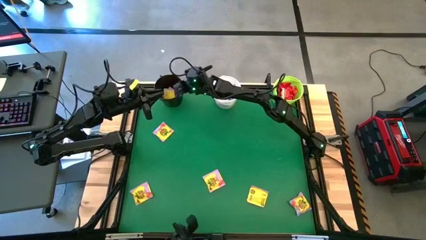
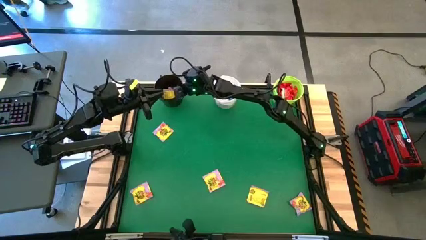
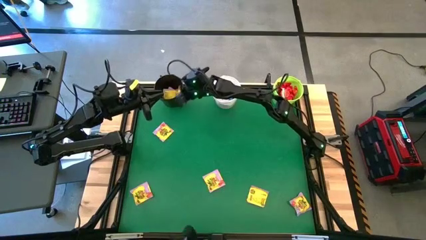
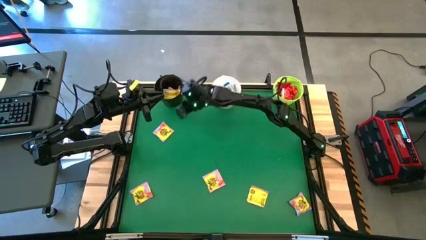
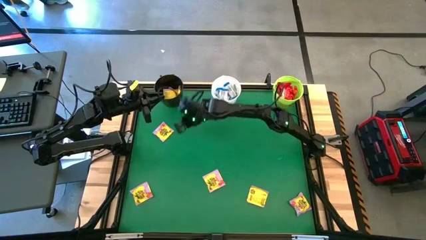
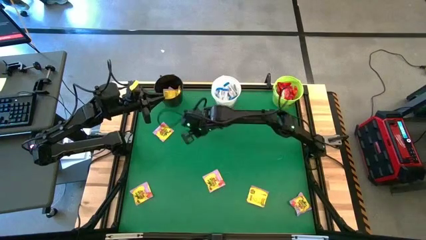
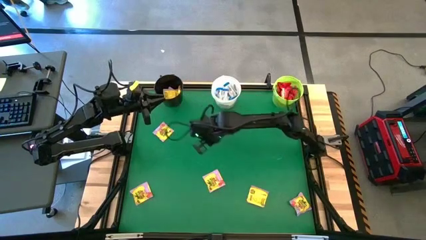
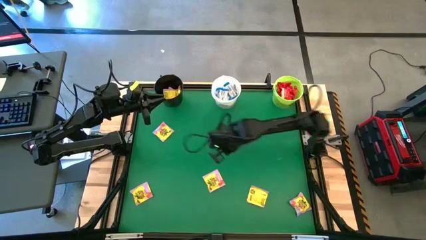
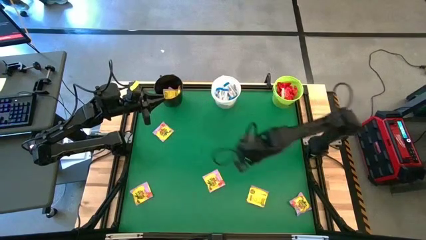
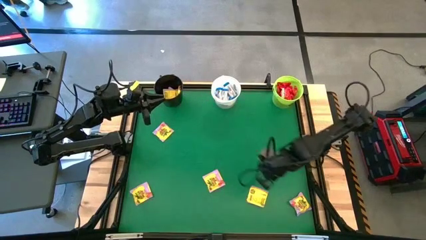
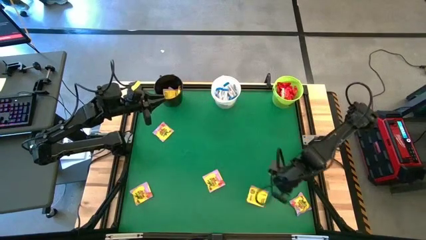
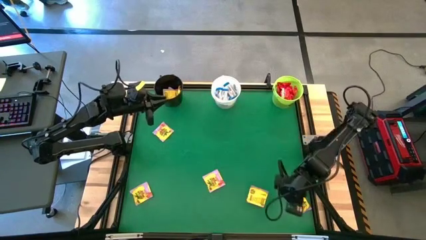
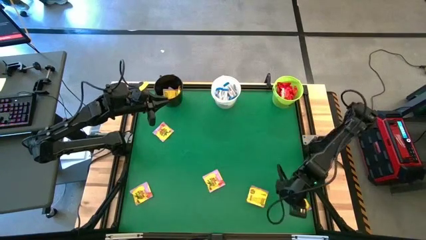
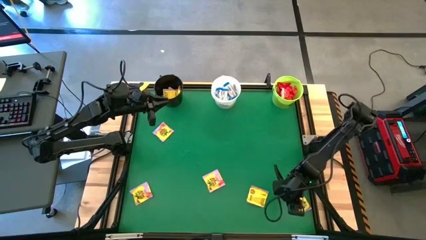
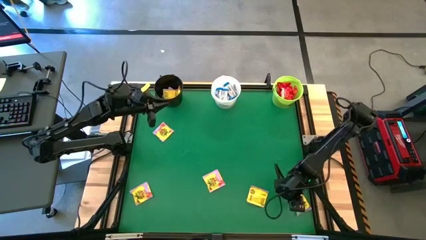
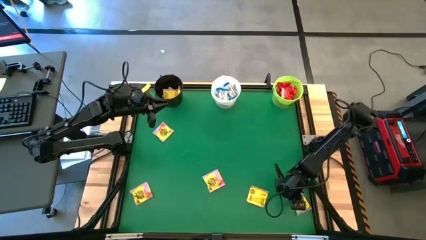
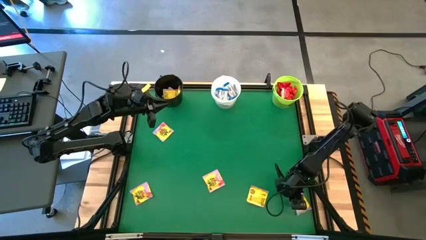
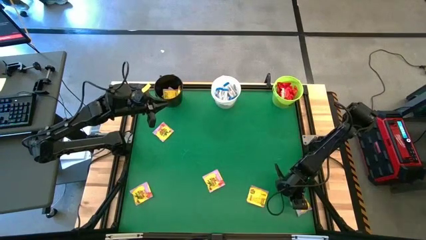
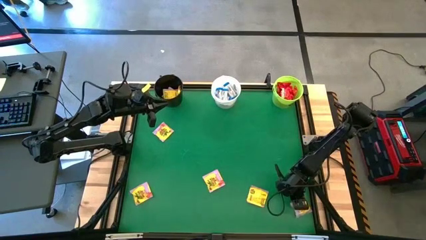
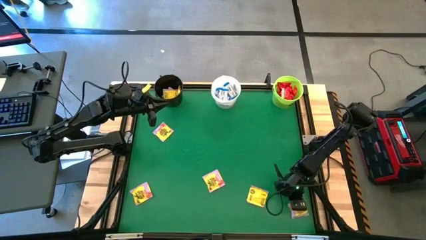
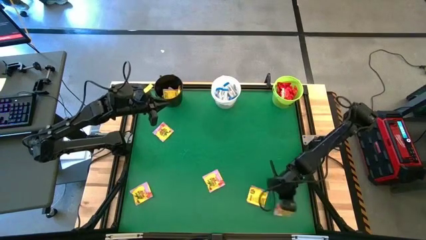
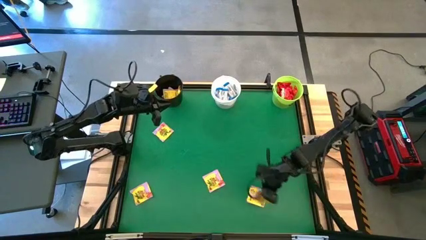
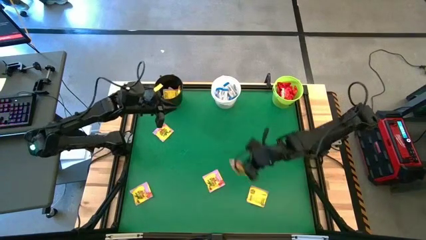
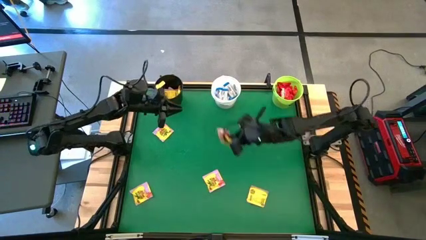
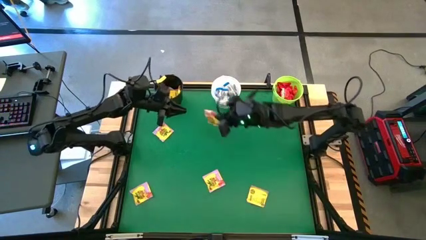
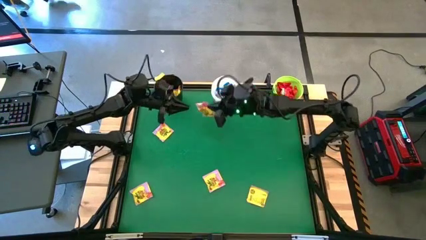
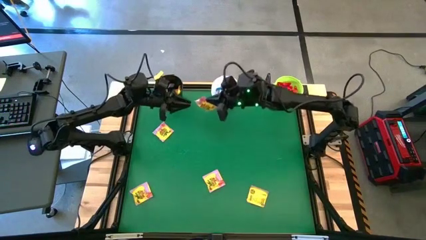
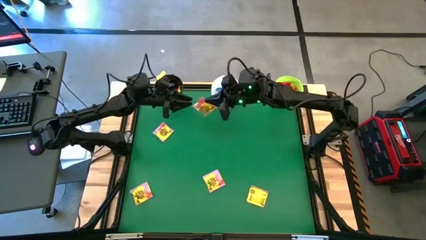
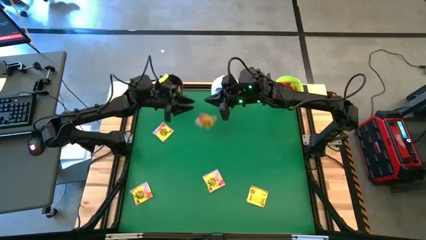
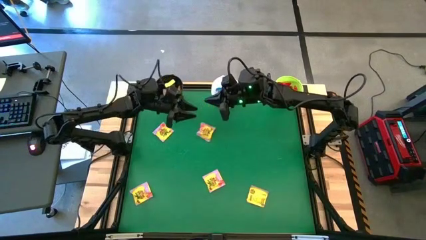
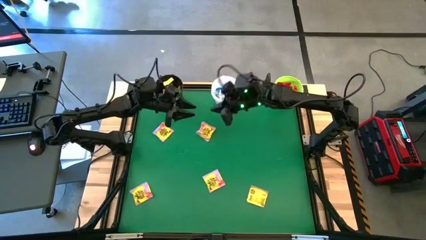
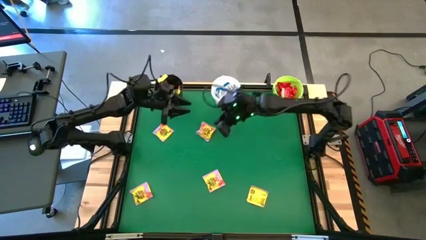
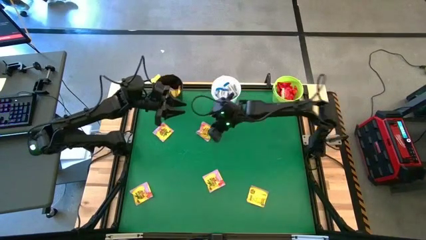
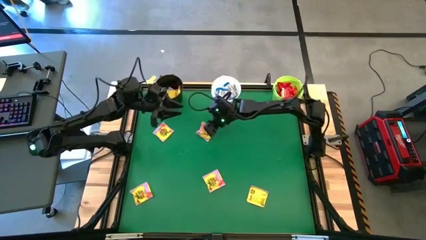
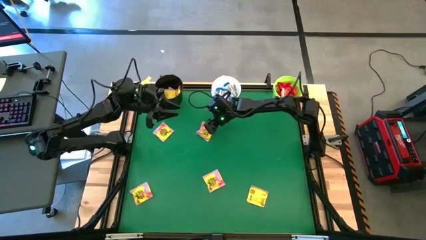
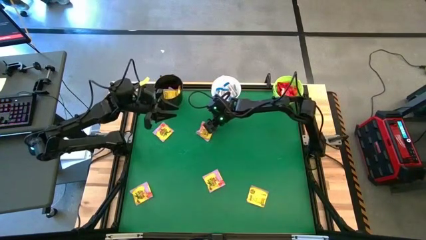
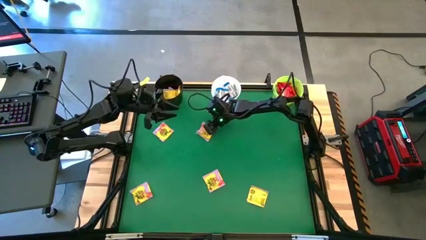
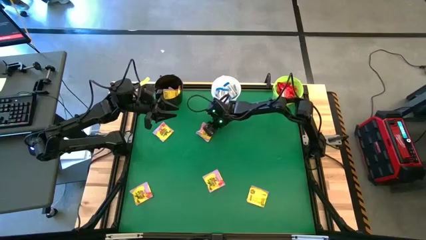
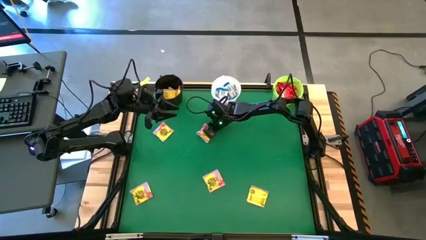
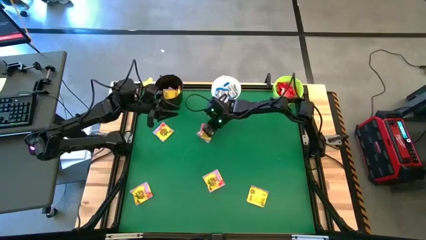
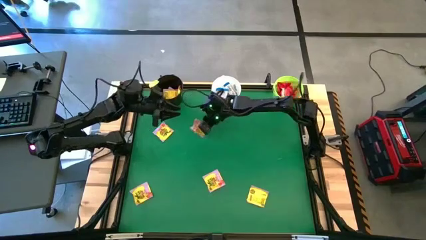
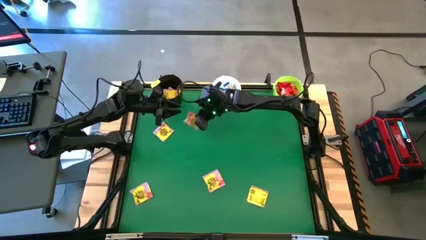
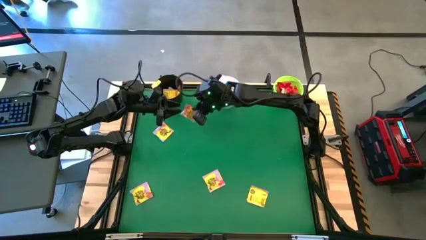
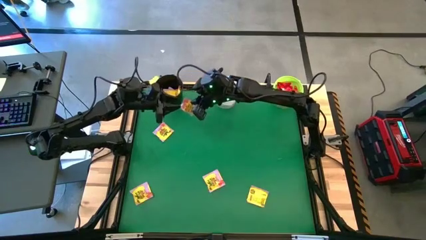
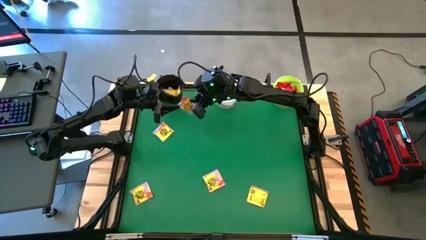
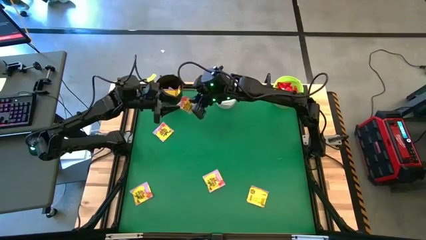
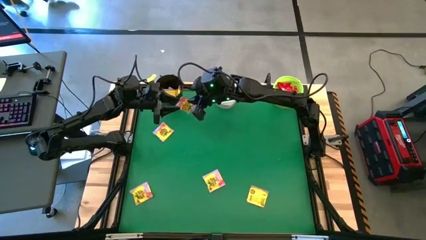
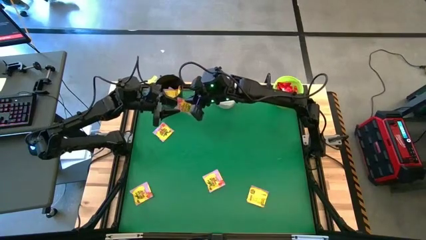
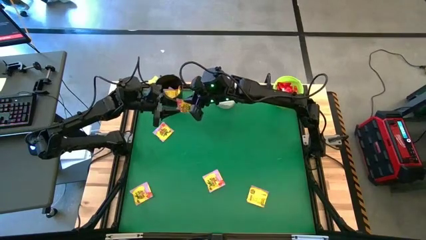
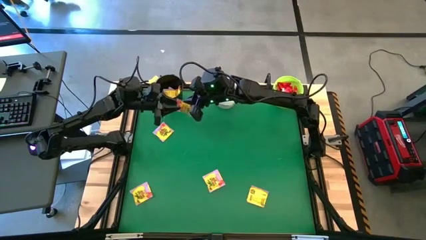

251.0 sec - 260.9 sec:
Task: Sort candy by brand, put in halloween buckets
Put the yellow candy into the black bucket

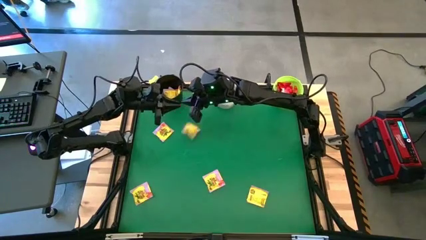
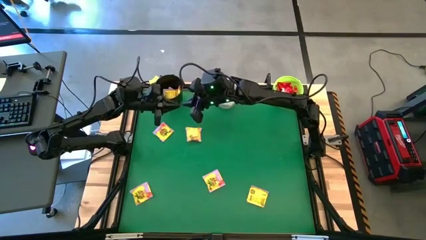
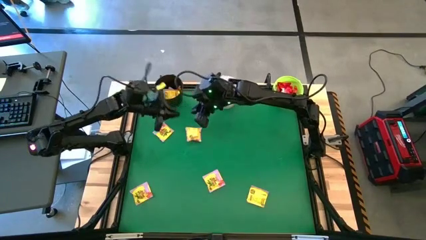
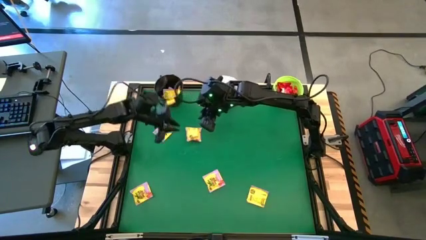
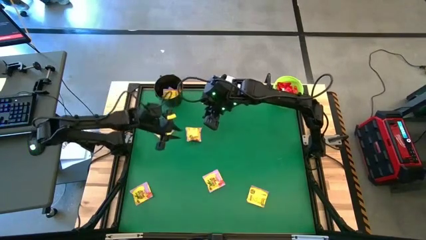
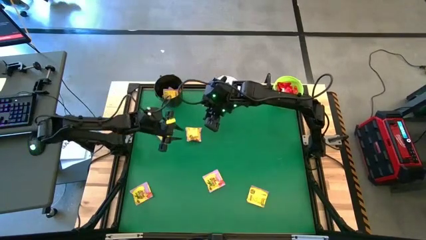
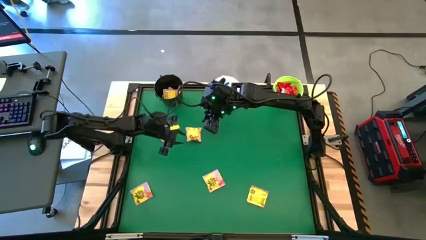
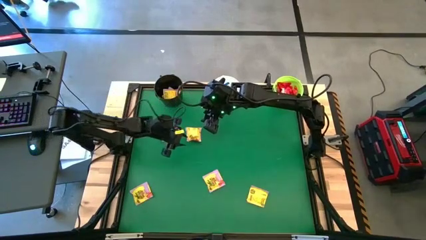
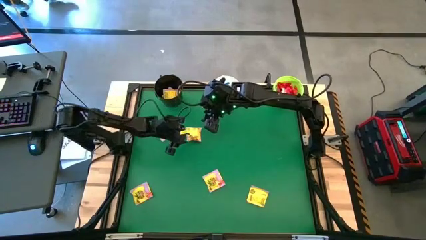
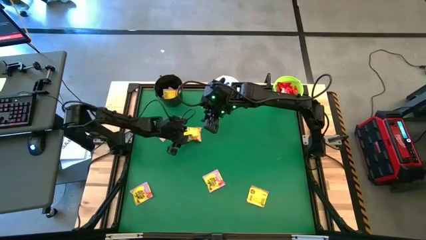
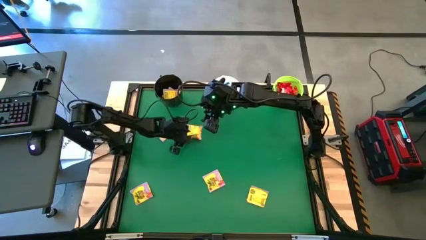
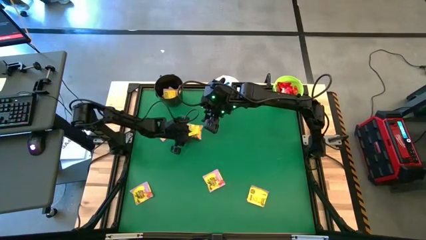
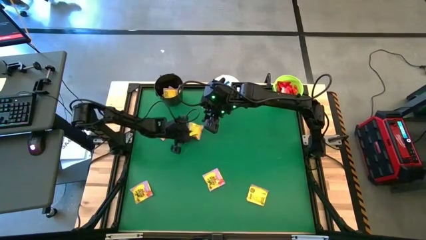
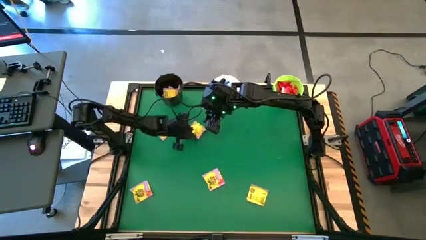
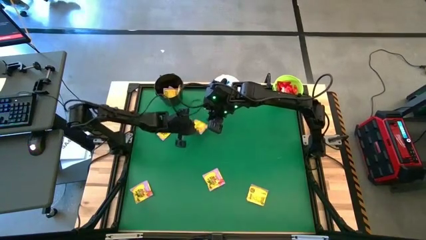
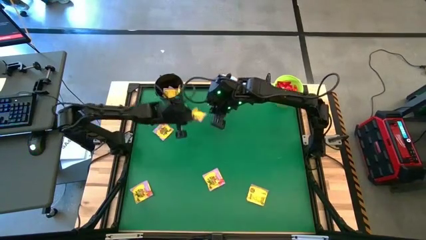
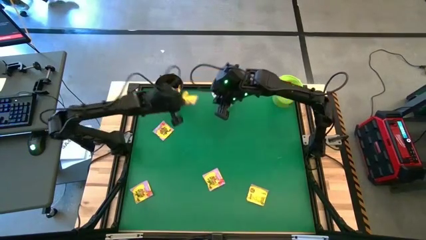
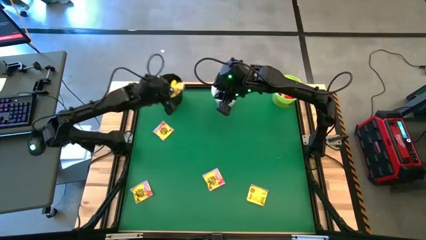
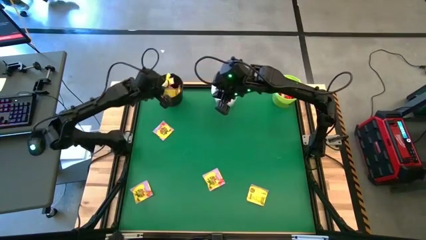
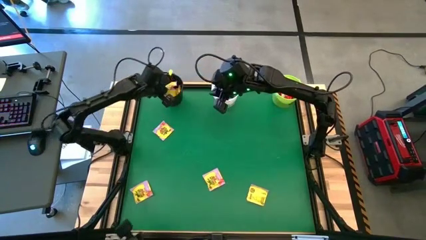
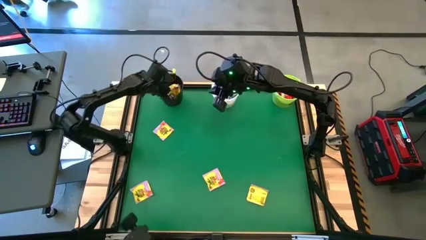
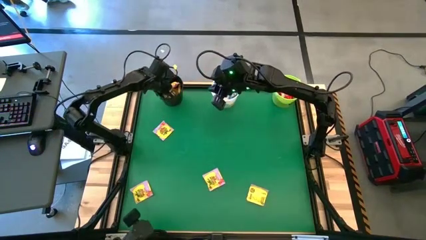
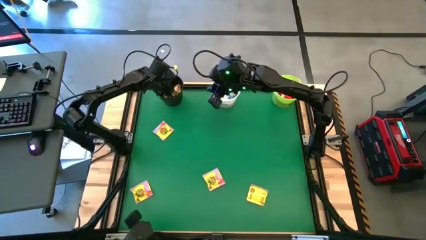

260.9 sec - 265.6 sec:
Put the yellow candy into the black bucket

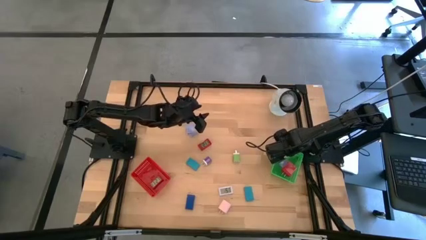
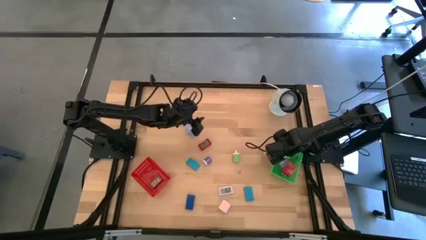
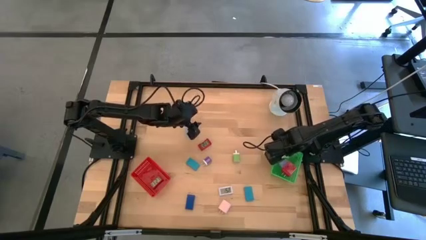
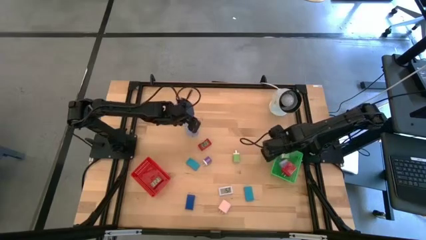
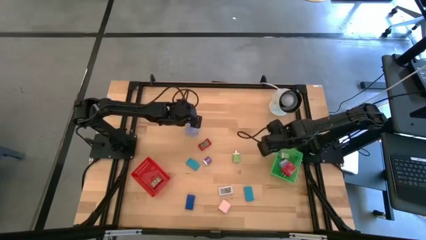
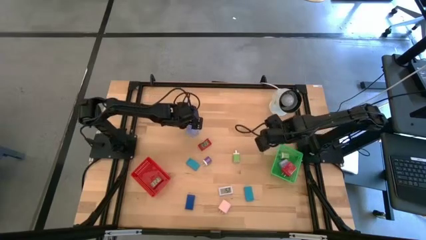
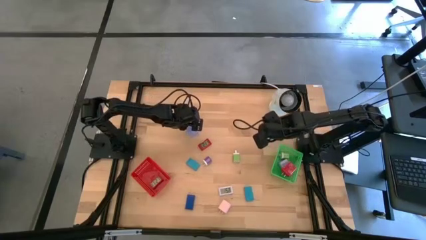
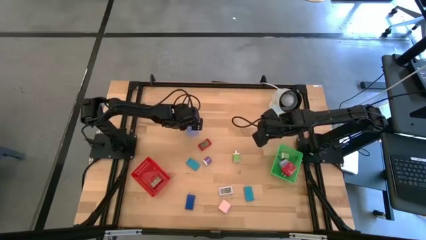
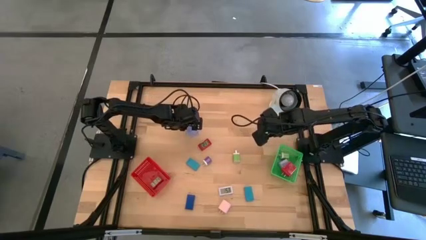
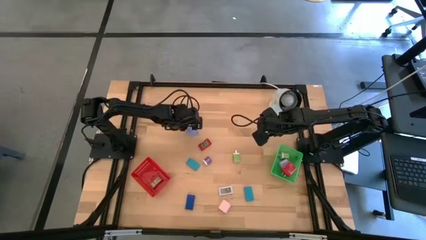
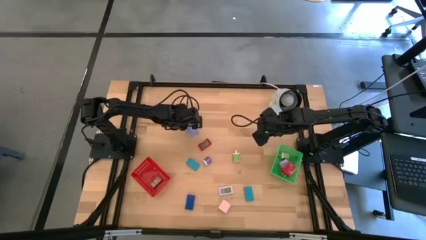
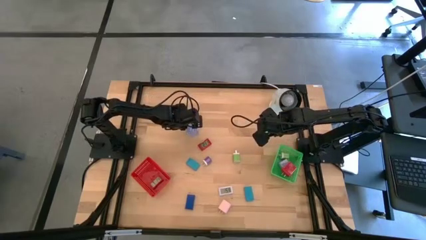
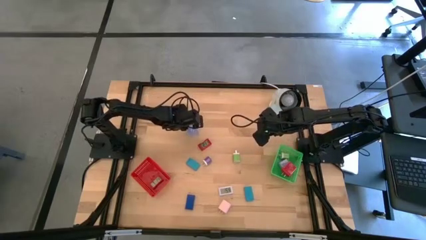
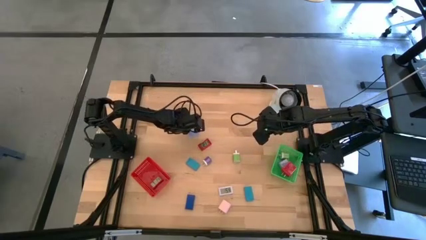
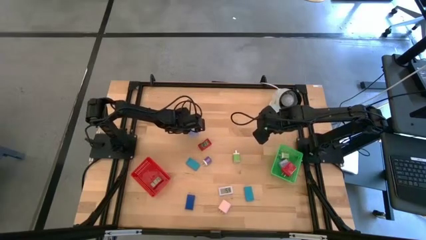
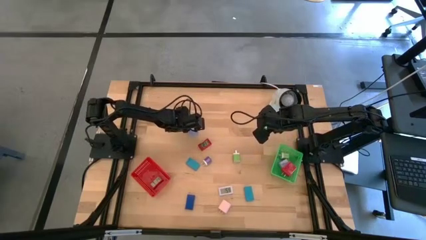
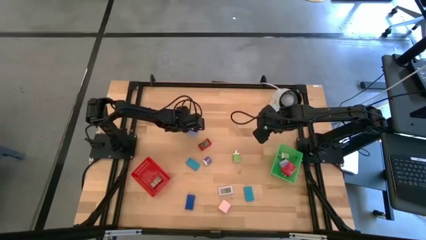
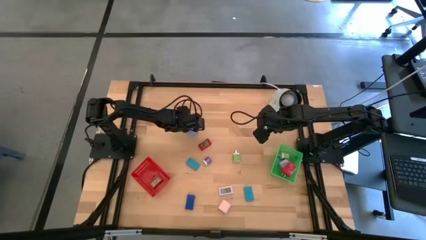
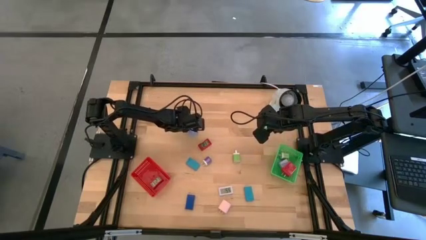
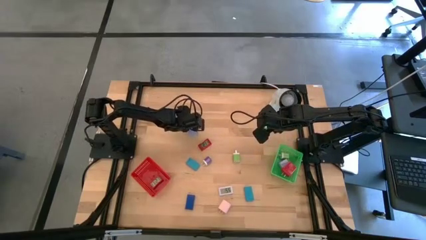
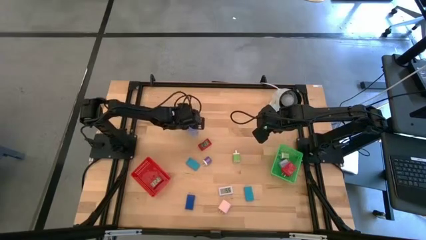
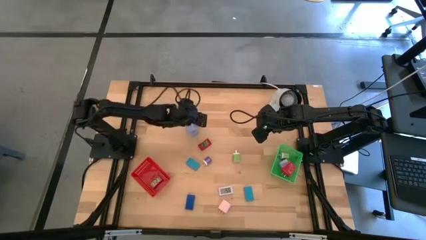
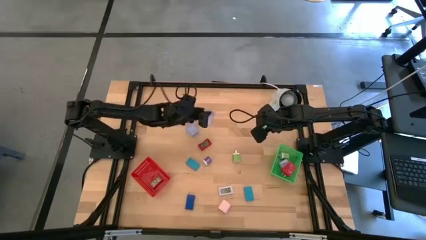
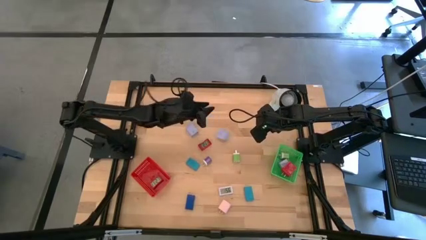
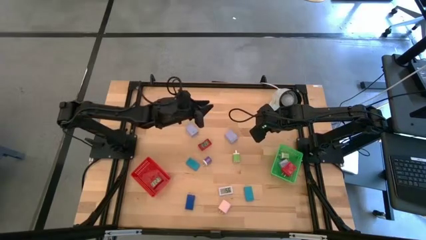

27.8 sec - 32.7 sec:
Task: Pick & Place Office items
Put the top light blue power adapter into the green bin
